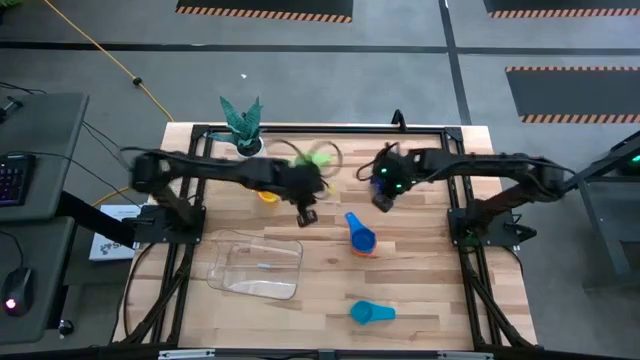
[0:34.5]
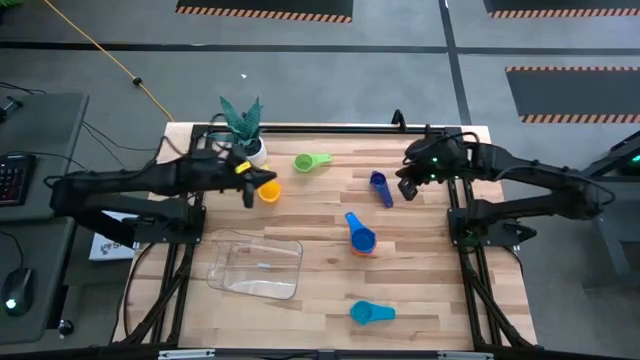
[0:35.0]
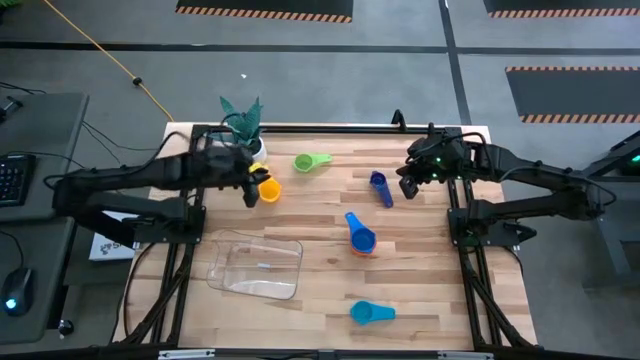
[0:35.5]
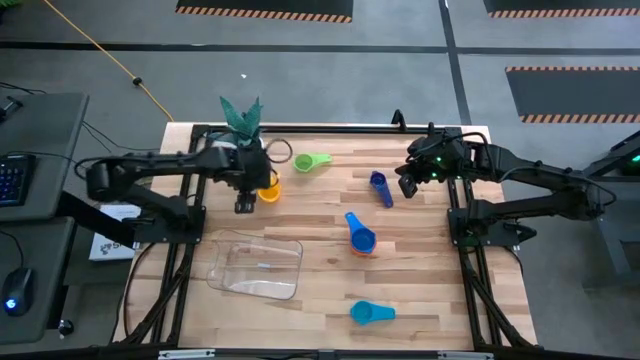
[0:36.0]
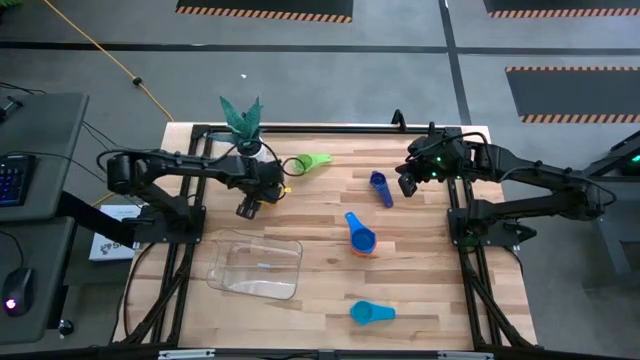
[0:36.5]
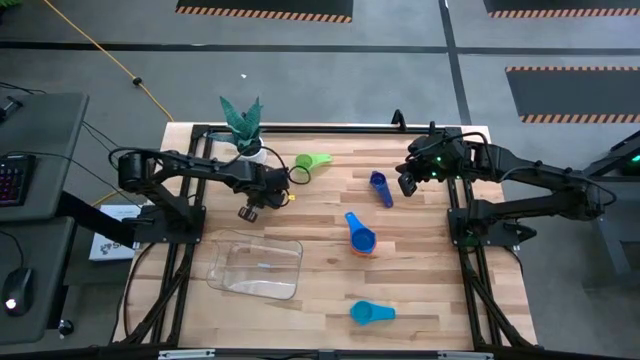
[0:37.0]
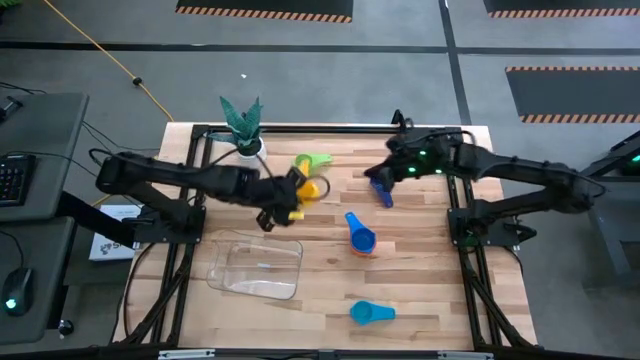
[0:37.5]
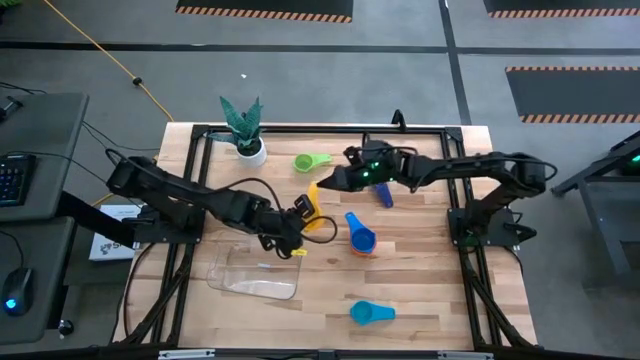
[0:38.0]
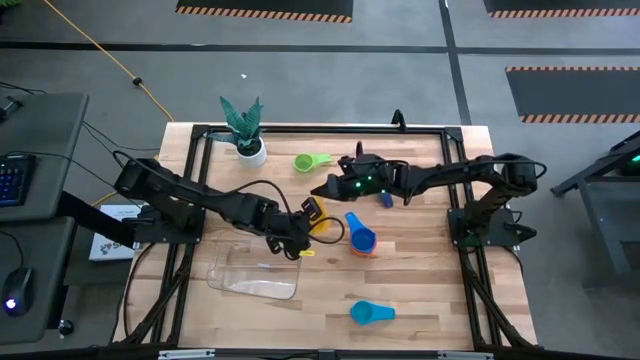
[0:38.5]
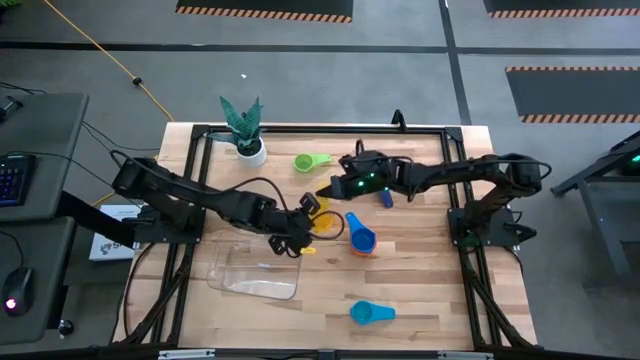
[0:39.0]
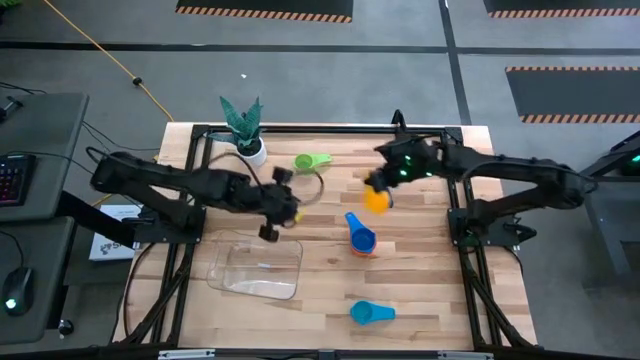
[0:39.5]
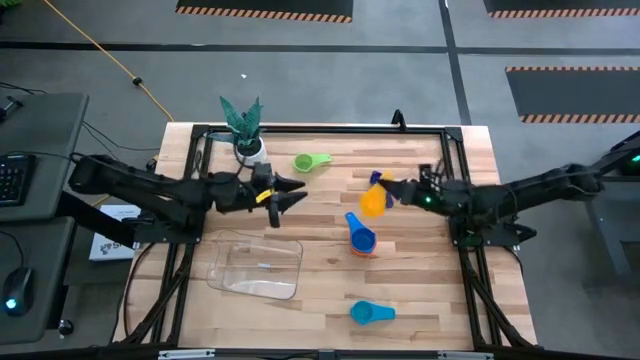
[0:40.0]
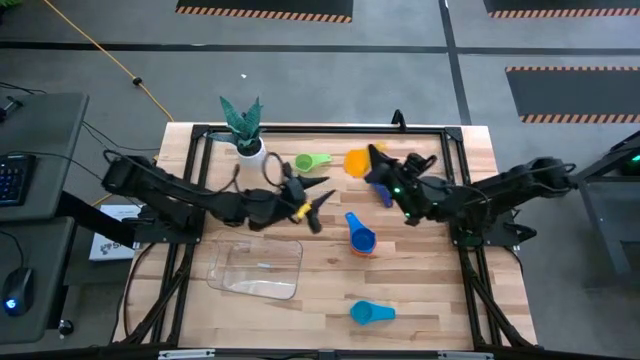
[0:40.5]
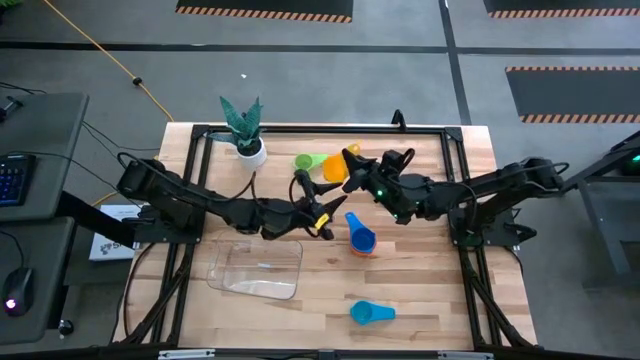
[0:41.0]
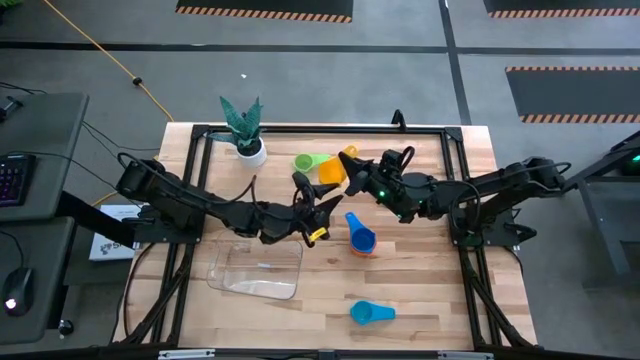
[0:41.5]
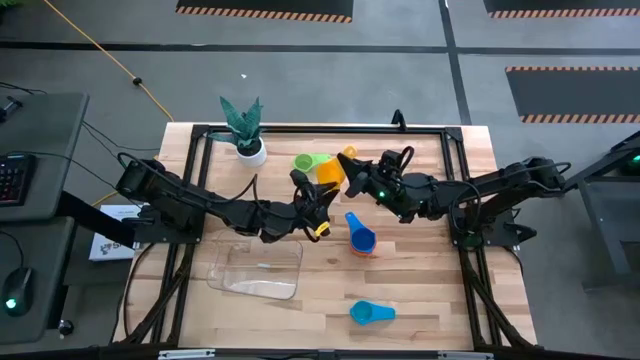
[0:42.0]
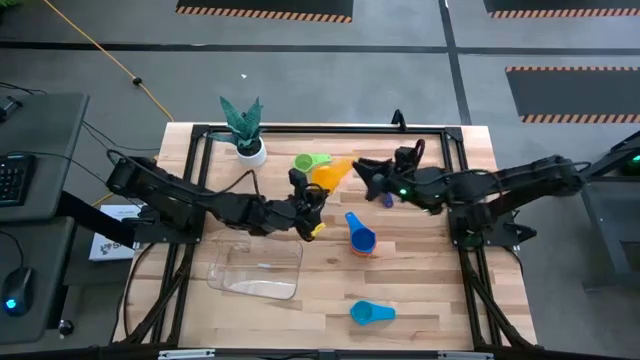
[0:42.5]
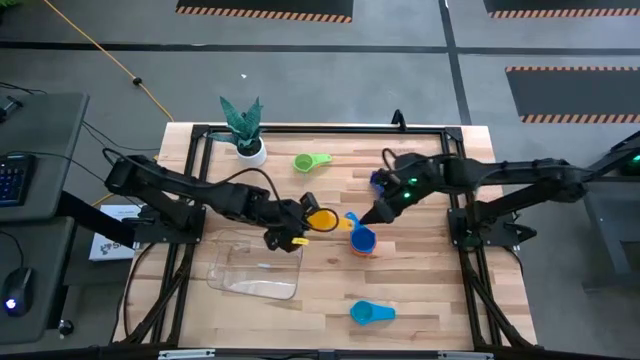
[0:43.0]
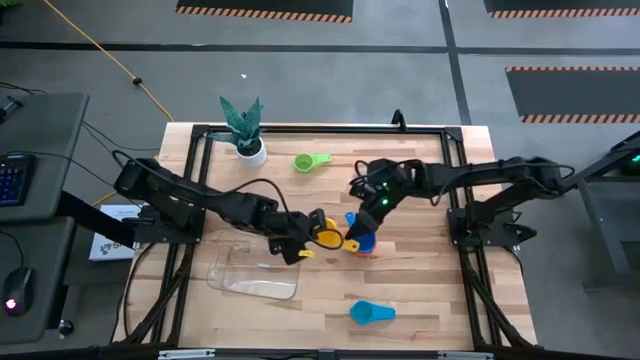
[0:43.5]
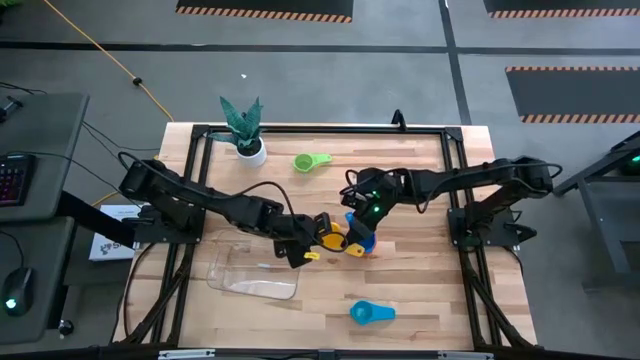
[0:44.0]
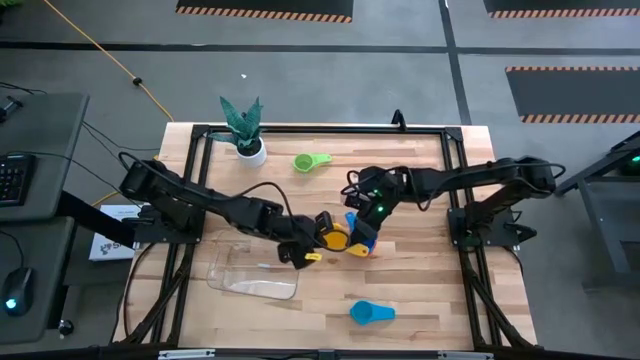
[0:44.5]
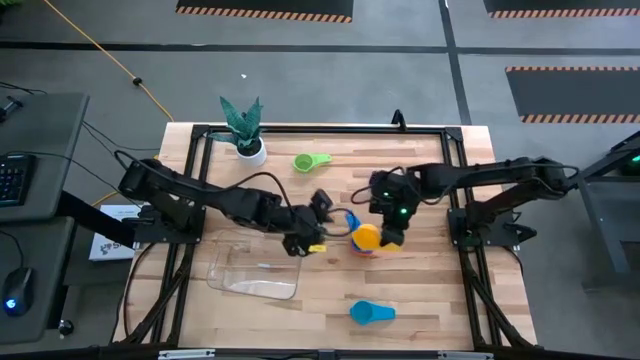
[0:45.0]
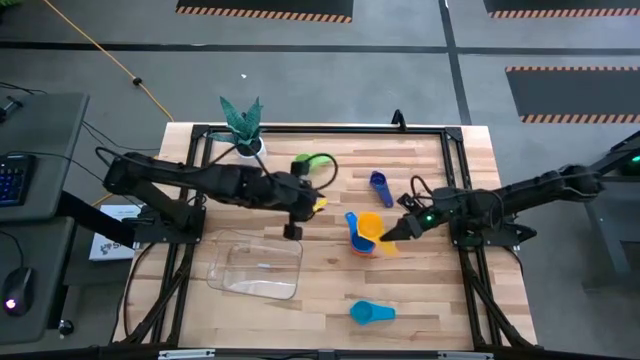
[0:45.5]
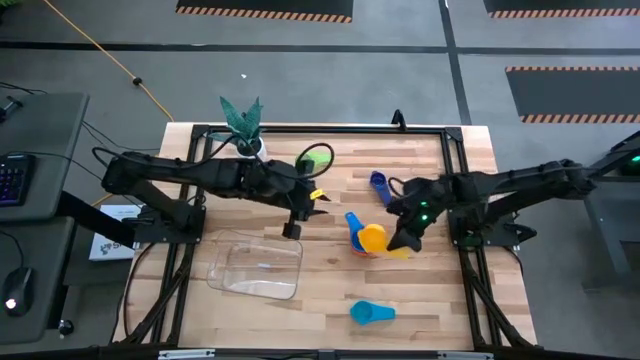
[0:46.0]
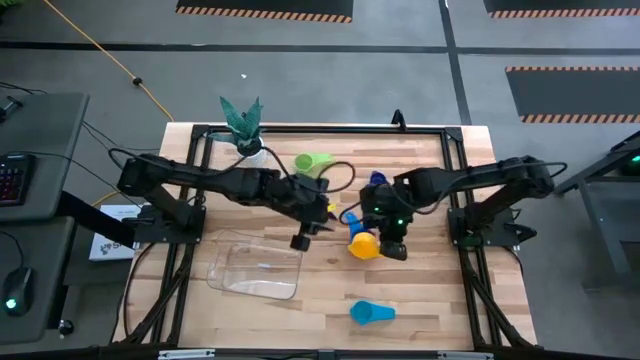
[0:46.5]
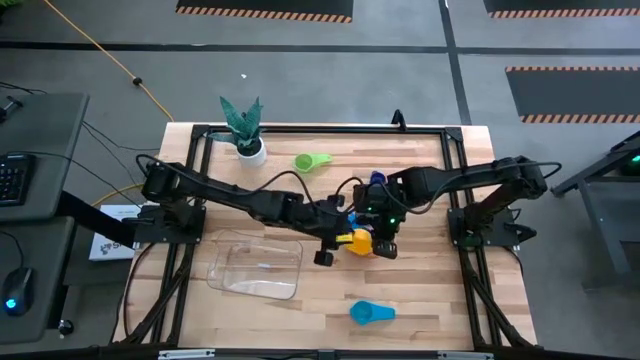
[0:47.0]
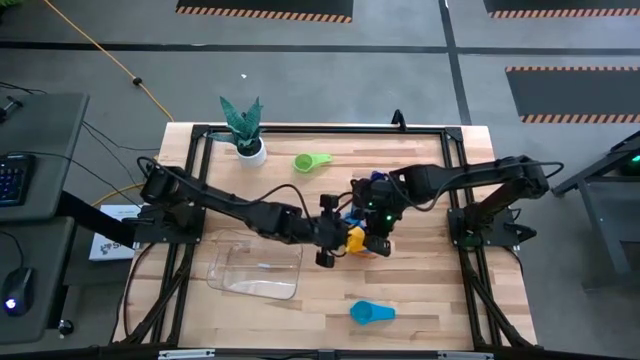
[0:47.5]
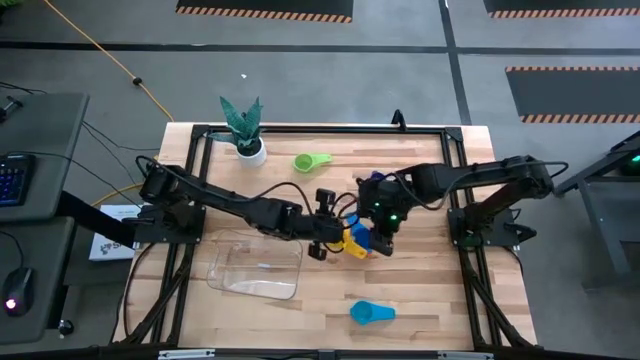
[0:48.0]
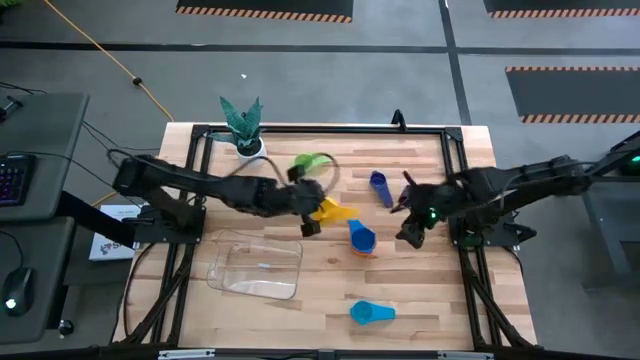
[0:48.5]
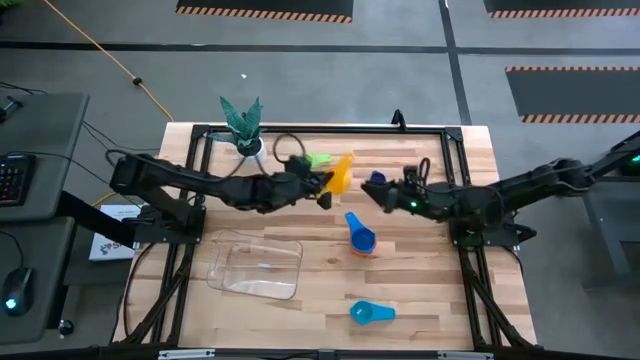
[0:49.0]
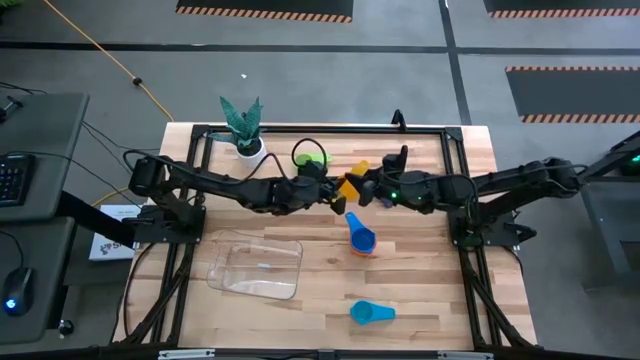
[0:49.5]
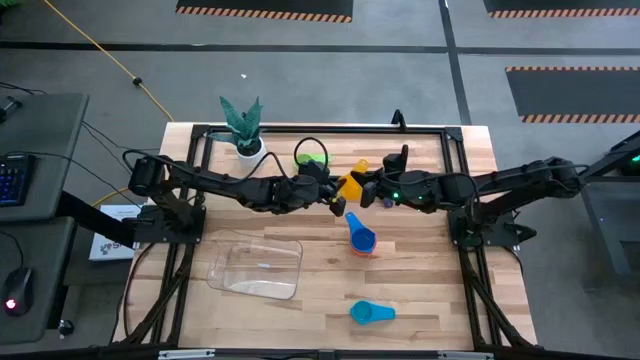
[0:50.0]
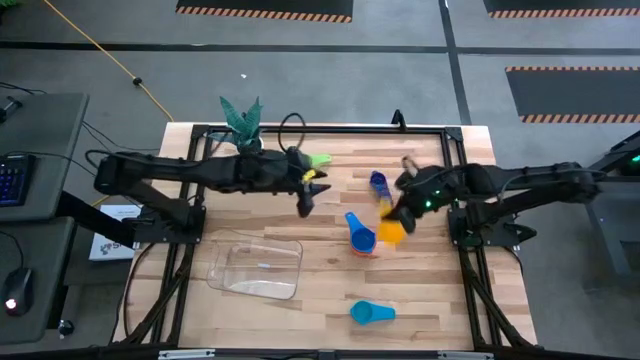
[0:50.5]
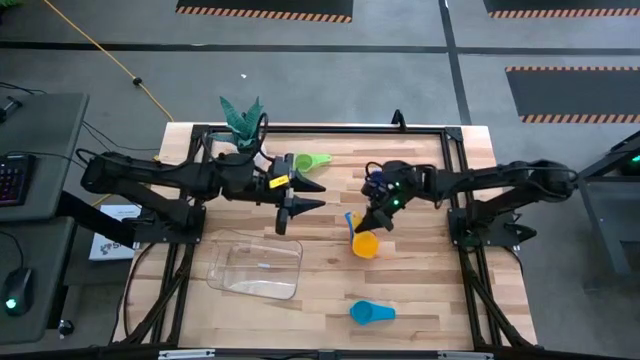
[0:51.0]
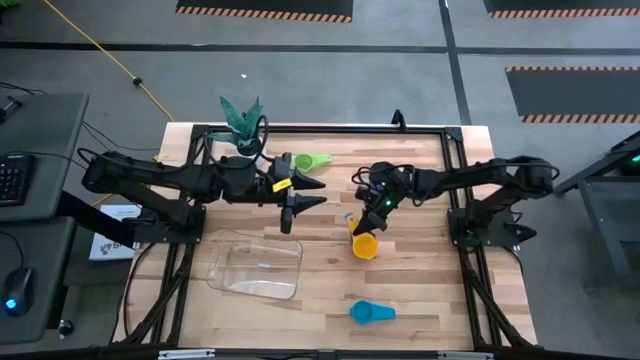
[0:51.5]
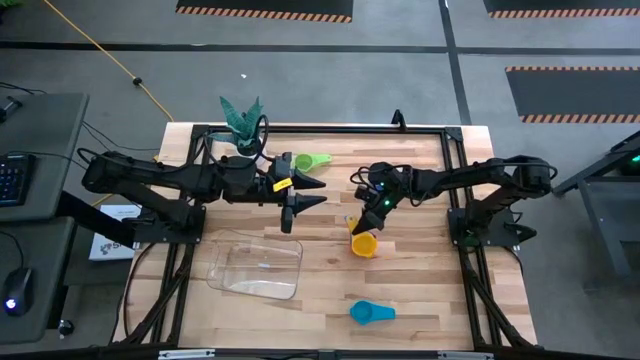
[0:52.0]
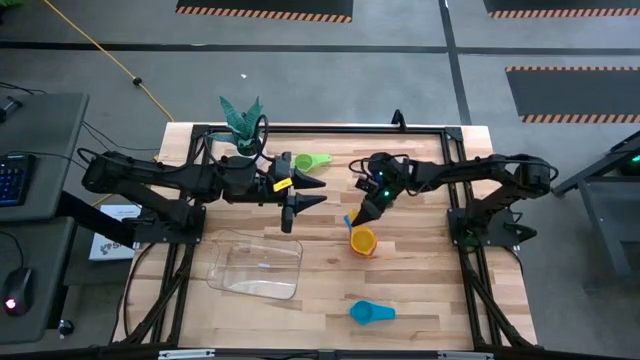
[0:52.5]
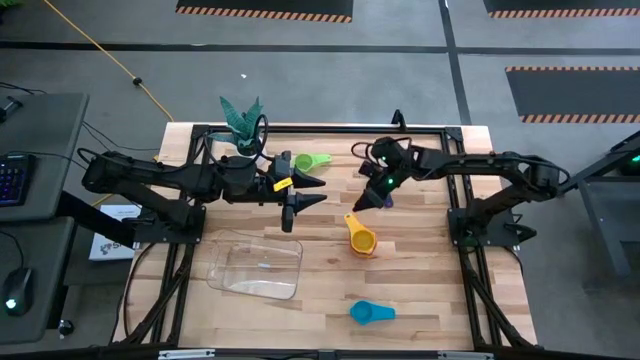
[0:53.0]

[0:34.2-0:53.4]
Task: Nest measuring cups in basket
Stack the yellow measuring cup on top of the blue measuring cup

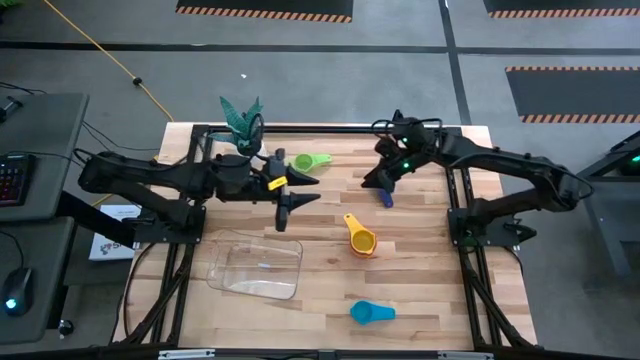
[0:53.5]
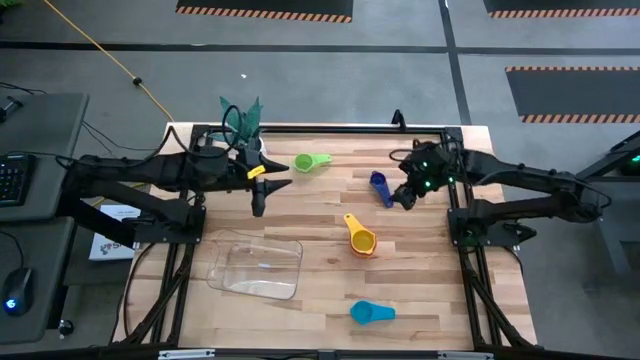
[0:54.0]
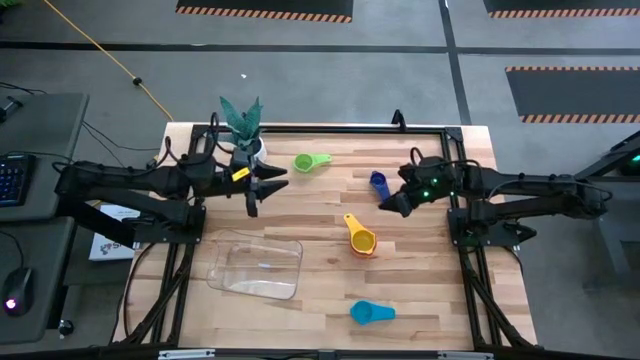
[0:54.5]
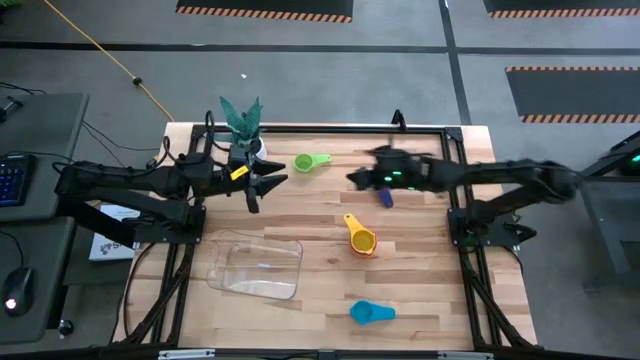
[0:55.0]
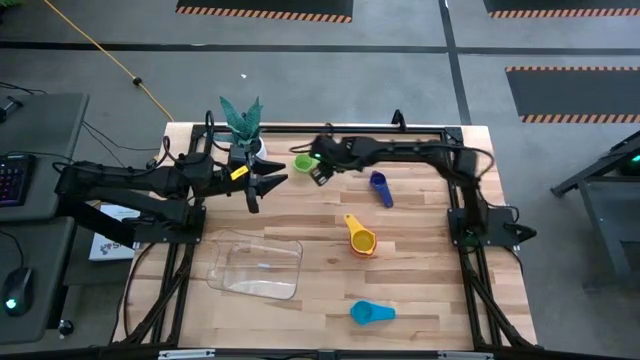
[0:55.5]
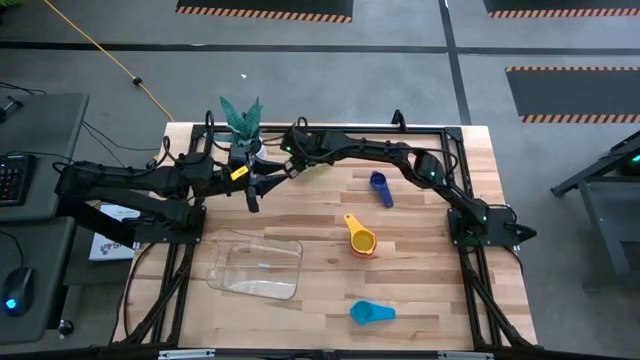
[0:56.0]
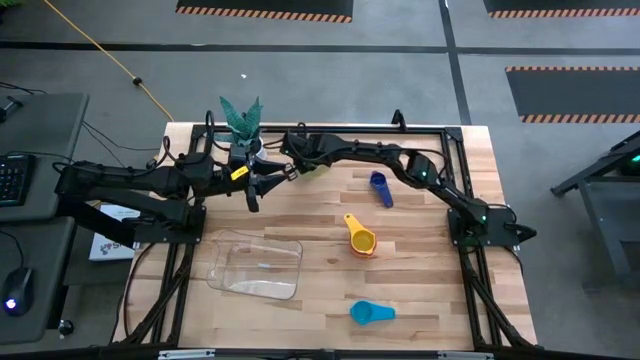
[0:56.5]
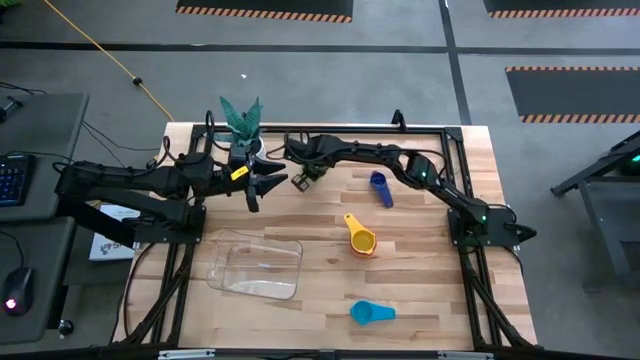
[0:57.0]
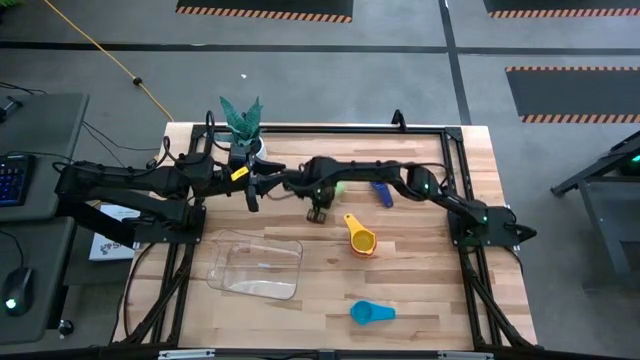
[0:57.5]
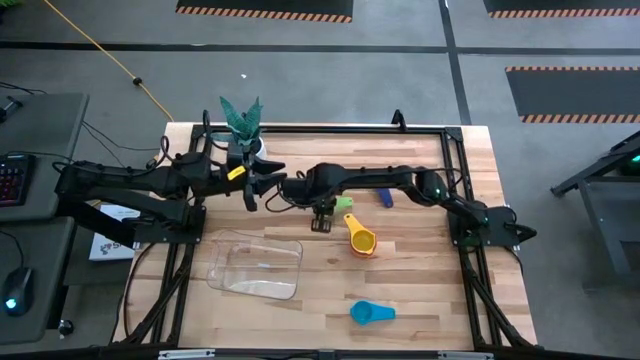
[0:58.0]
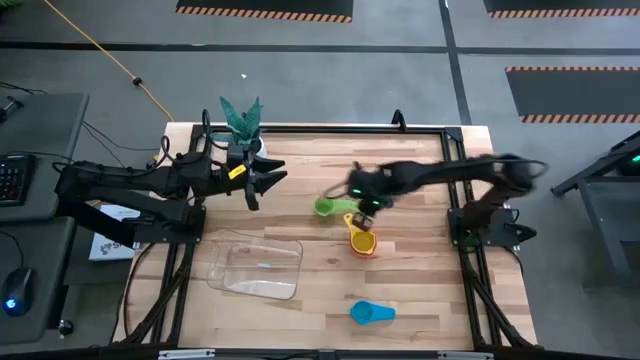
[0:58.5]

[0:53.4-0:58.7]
Move the green measuring cup to the center of the table
